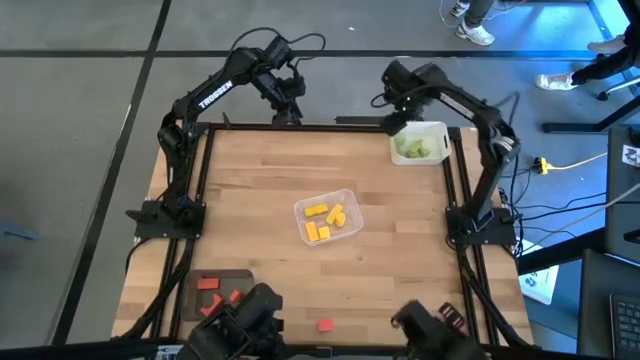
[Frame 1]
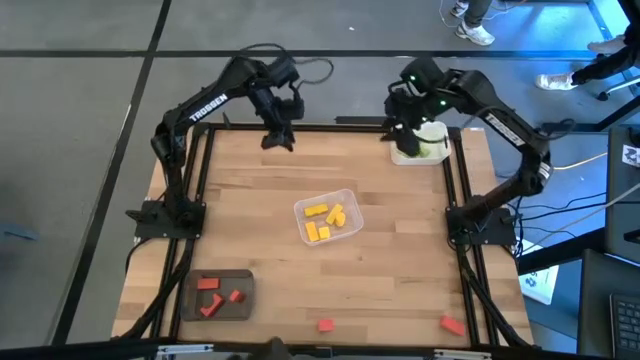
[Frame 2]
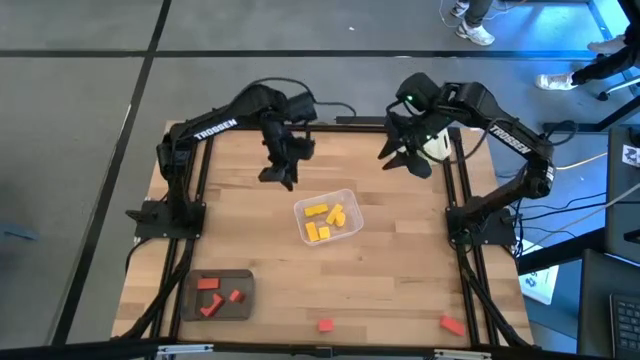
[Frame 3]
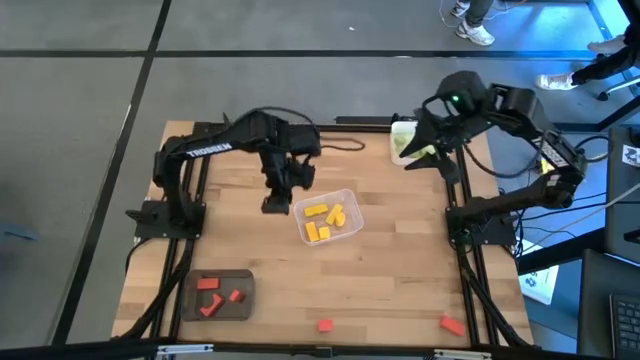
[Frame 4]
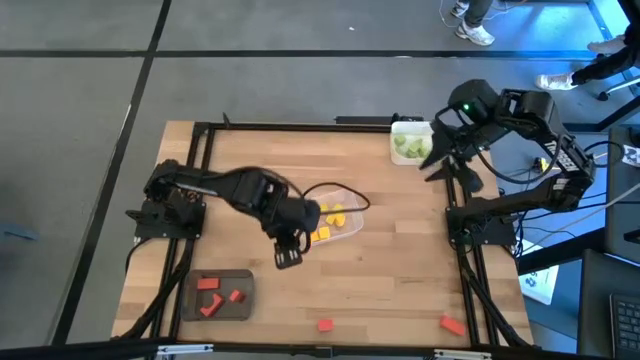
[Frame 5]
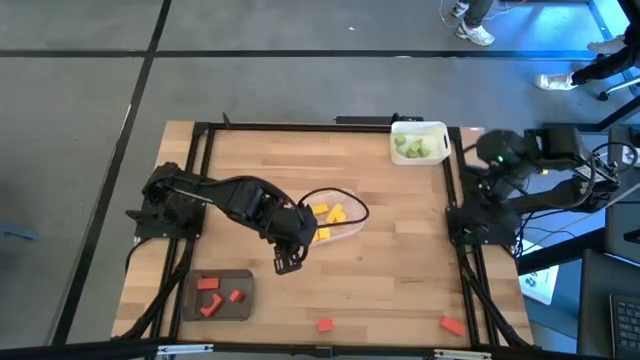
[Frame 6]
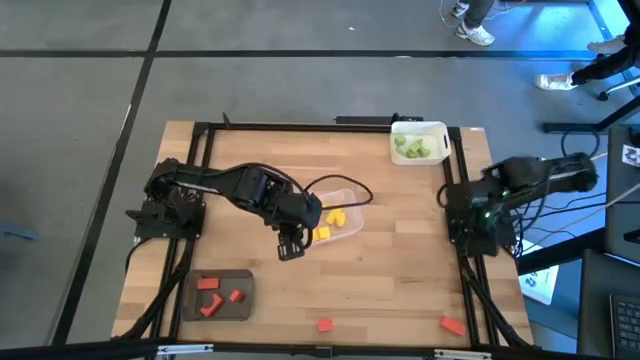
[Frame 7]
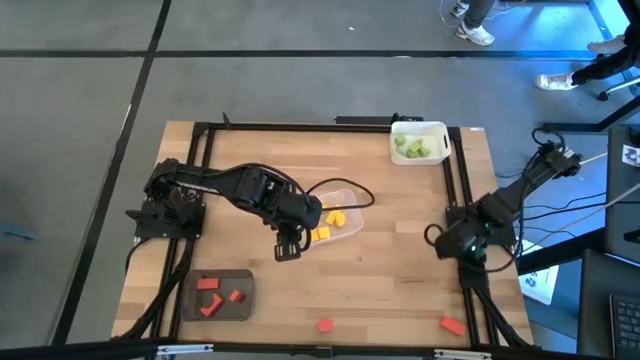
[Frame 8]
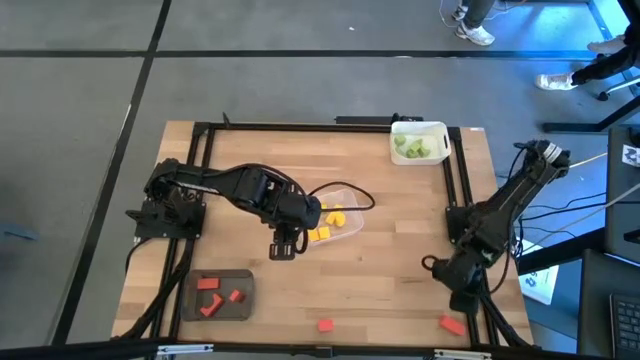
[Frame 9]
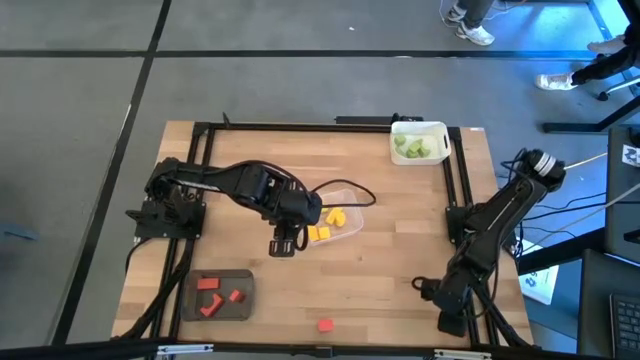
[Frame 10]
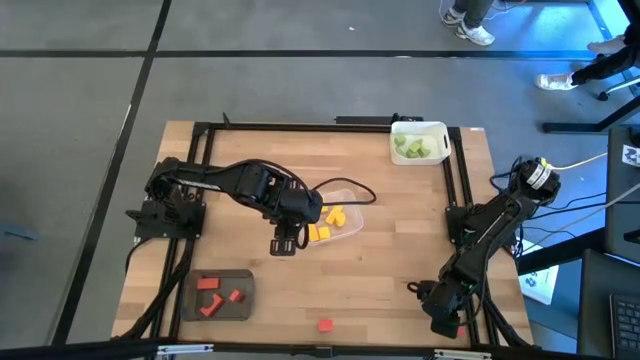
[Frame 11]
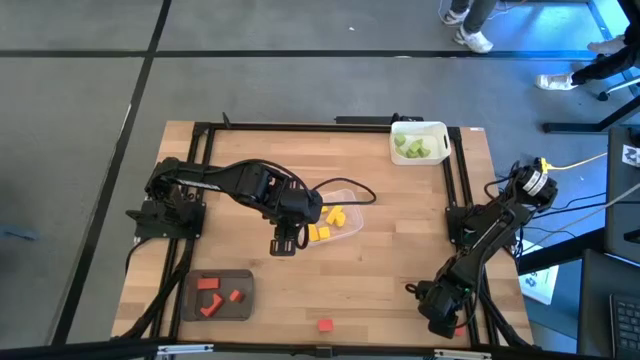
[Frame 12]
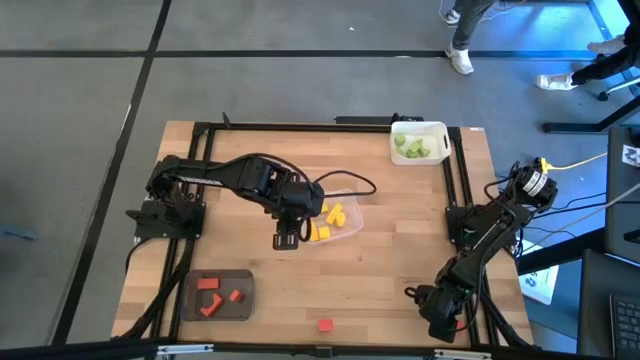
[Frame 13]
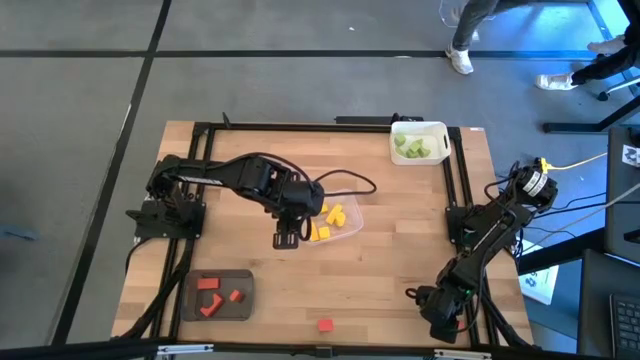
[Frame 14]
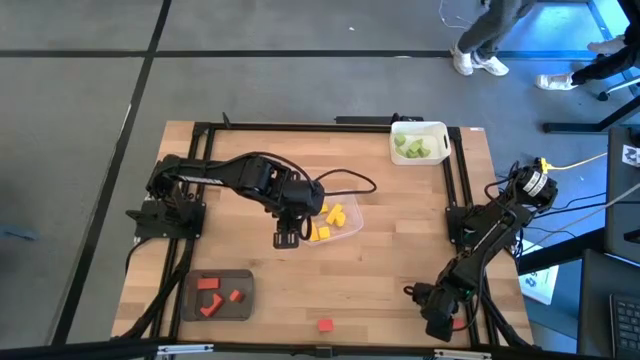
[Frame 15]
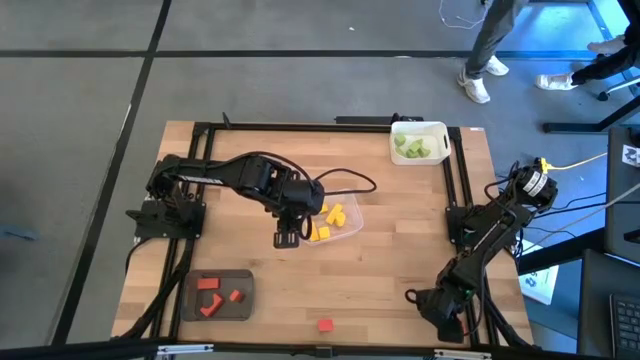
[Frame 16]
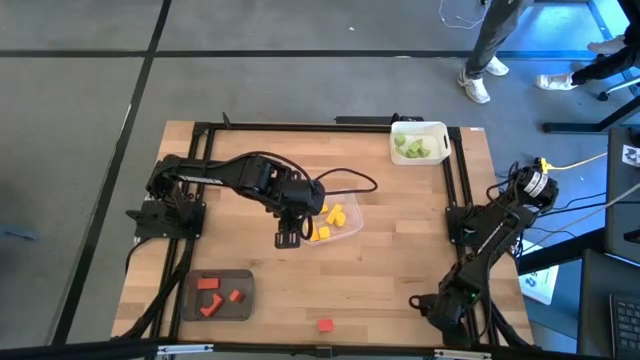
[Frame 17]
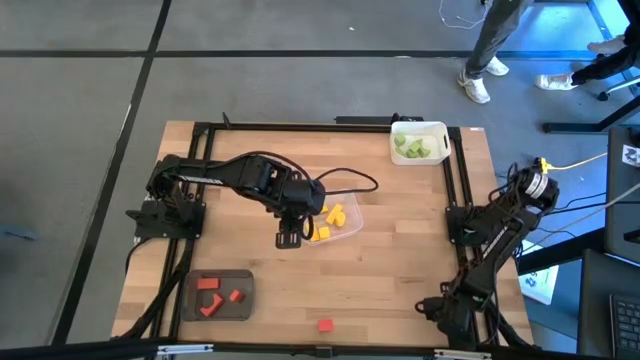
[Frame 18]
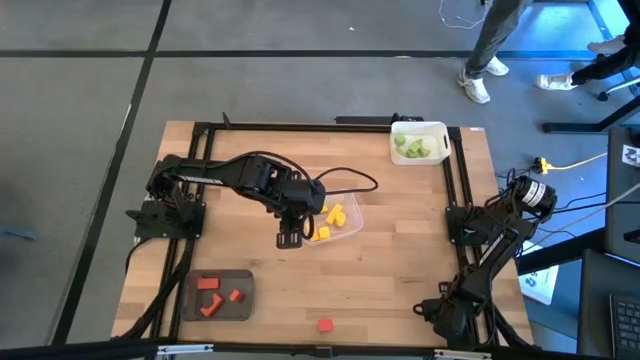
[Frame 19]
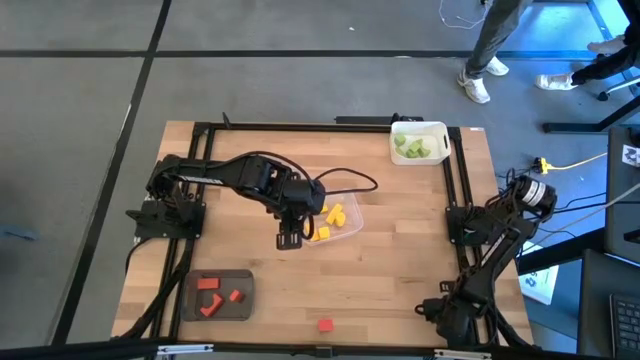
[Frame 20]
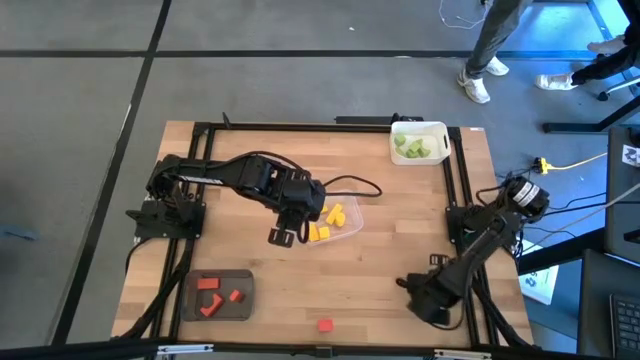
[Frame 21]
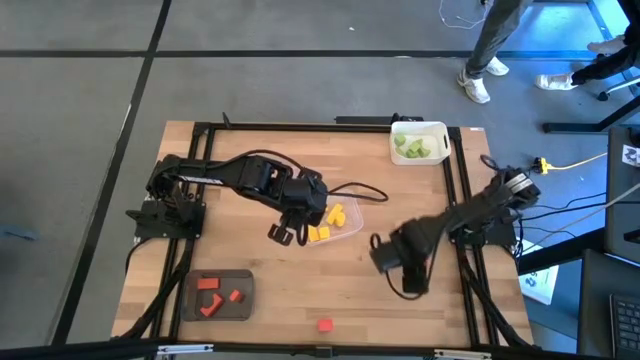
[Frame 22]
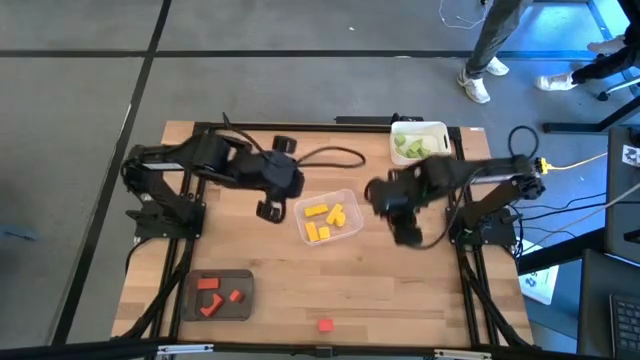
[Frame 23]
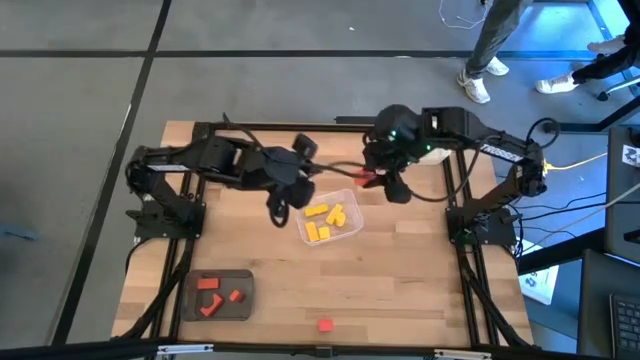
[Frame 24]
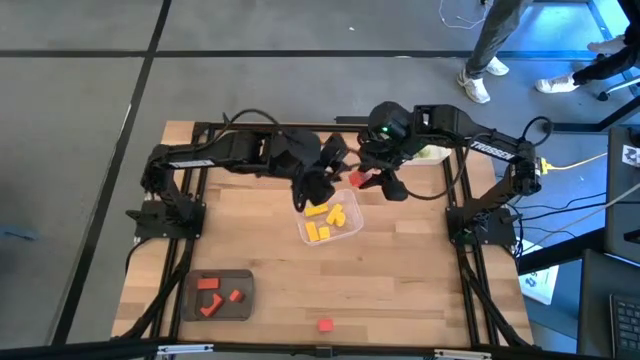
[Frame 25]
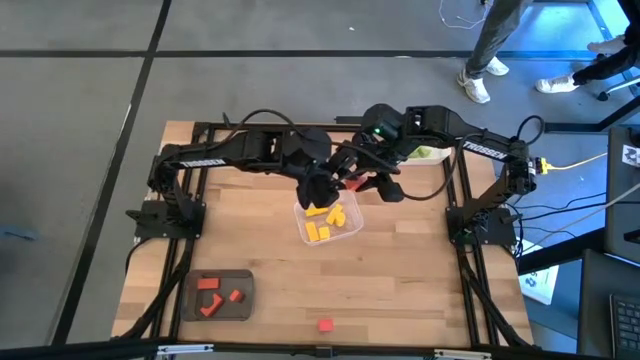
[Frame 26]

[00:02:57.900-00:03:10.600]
Task: Sort & place blocks by color
Put the orange block into the black bin
